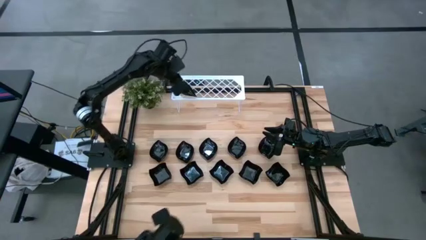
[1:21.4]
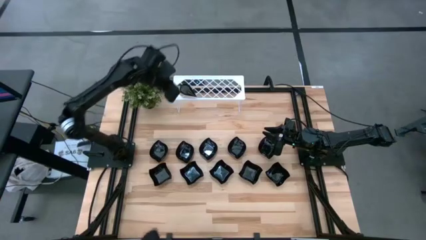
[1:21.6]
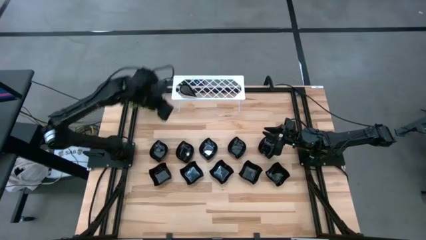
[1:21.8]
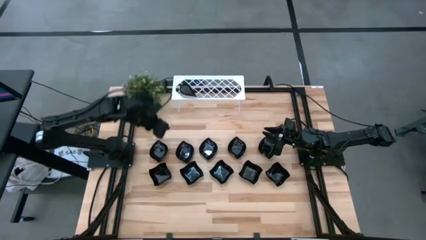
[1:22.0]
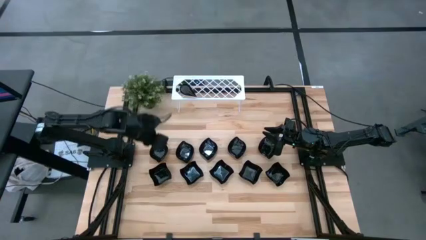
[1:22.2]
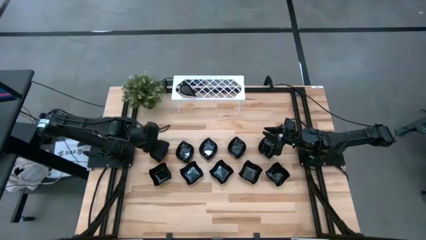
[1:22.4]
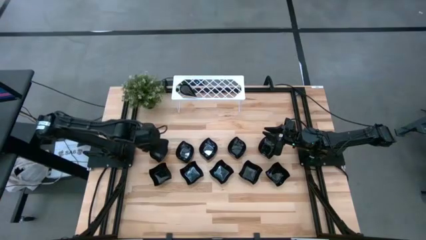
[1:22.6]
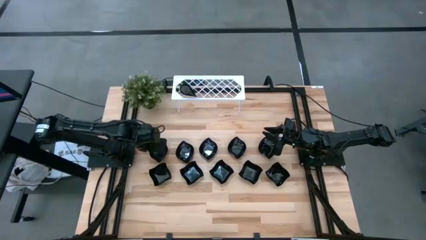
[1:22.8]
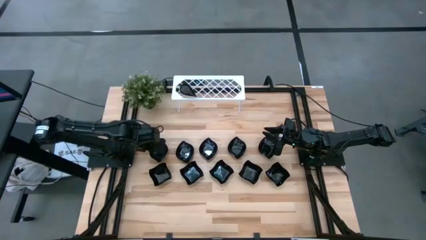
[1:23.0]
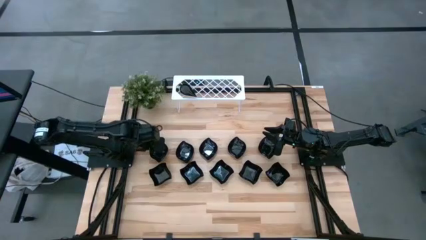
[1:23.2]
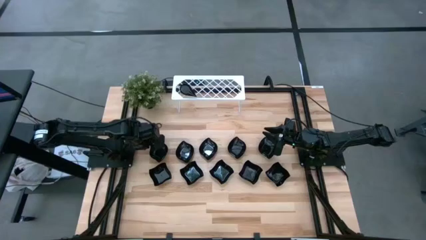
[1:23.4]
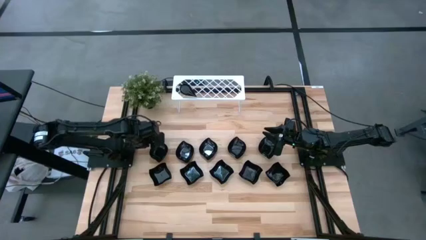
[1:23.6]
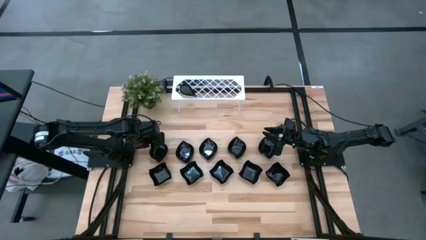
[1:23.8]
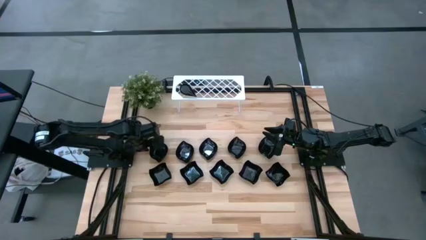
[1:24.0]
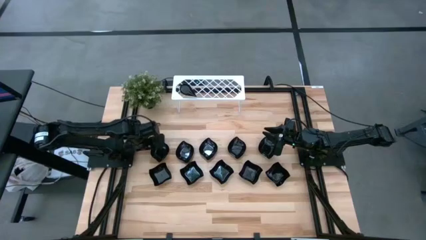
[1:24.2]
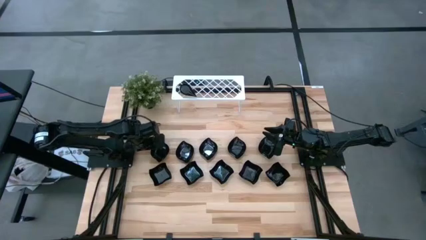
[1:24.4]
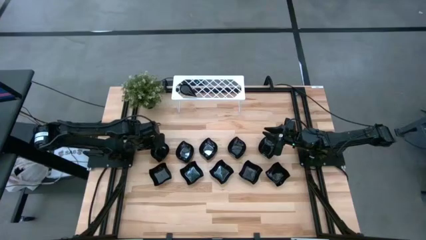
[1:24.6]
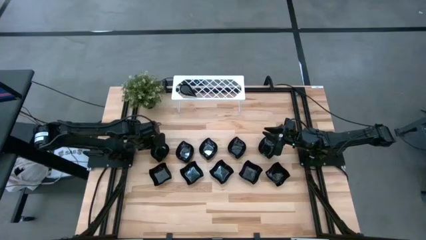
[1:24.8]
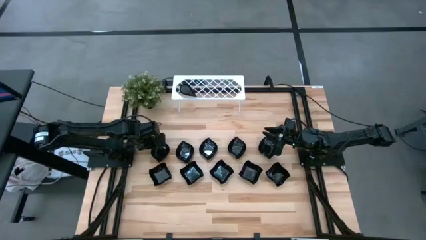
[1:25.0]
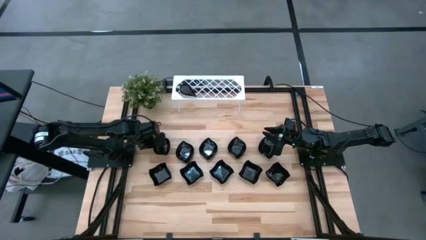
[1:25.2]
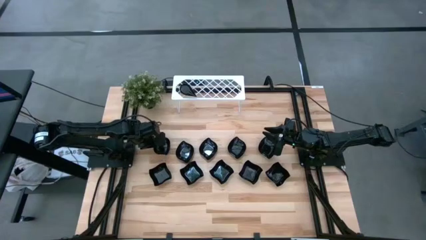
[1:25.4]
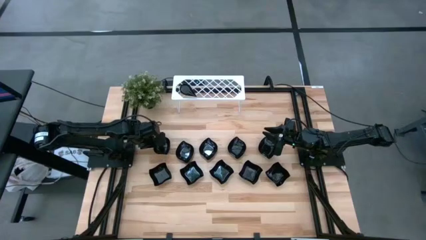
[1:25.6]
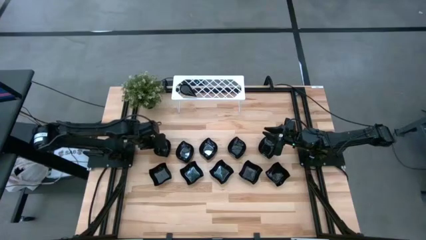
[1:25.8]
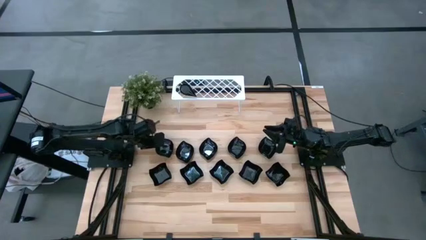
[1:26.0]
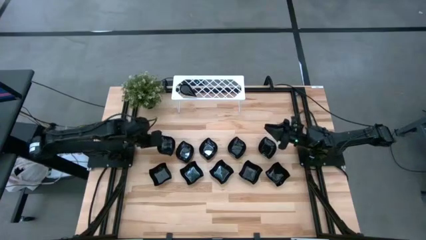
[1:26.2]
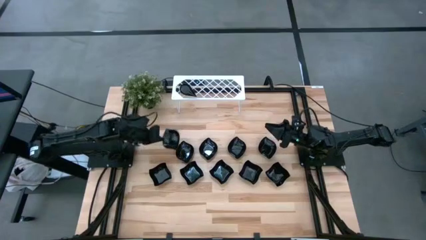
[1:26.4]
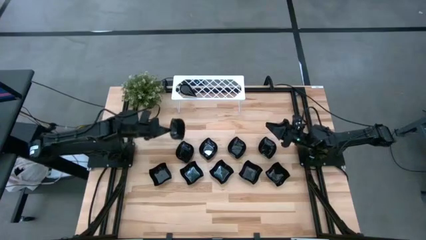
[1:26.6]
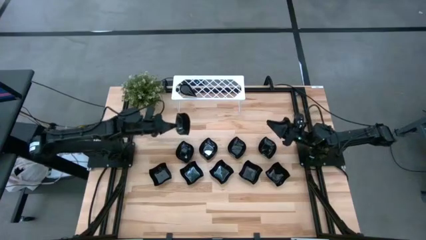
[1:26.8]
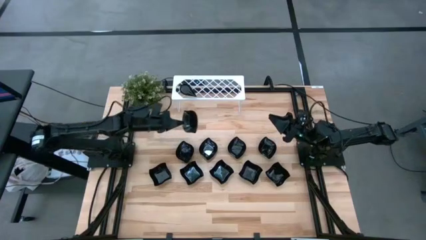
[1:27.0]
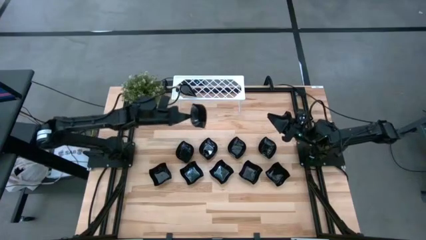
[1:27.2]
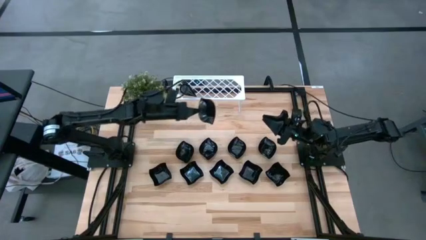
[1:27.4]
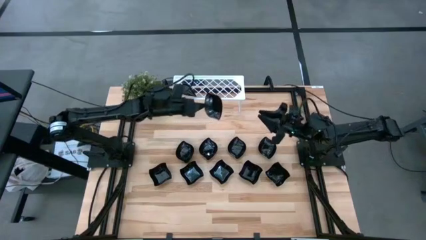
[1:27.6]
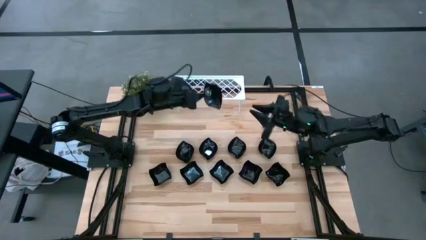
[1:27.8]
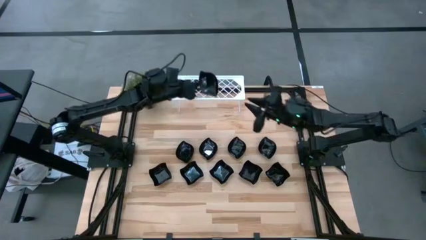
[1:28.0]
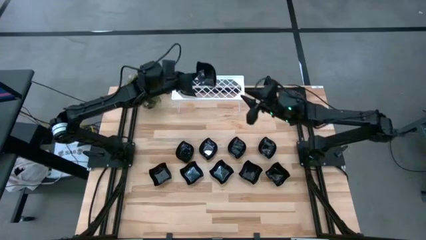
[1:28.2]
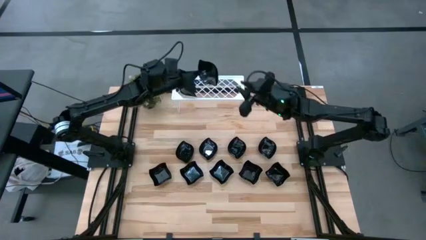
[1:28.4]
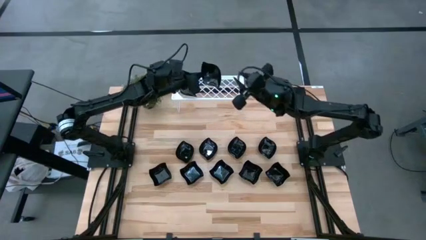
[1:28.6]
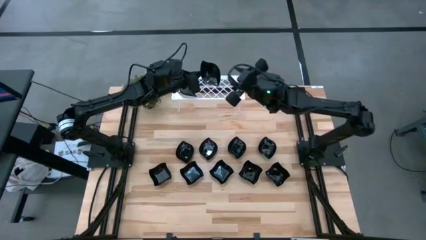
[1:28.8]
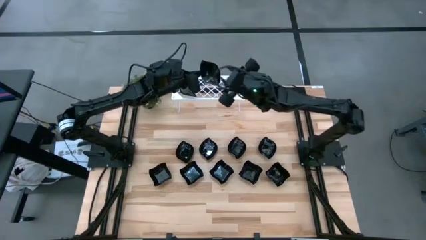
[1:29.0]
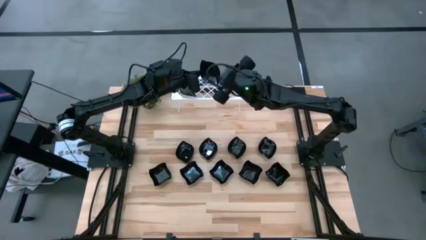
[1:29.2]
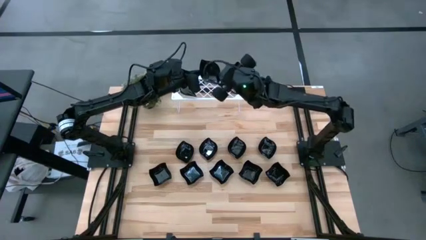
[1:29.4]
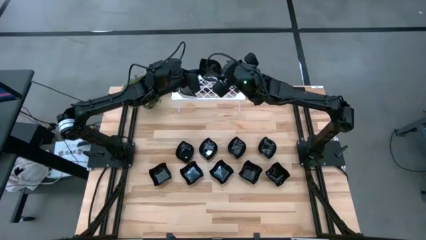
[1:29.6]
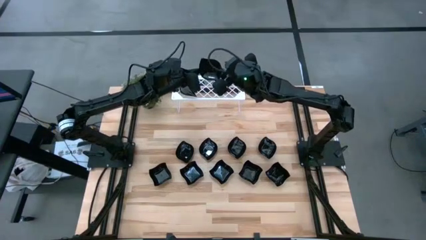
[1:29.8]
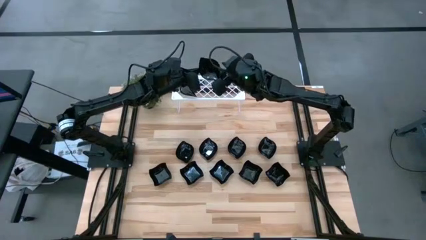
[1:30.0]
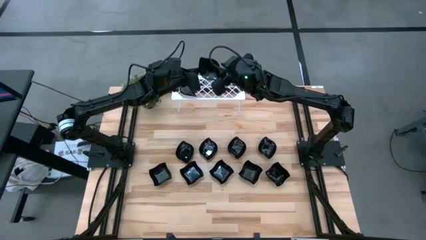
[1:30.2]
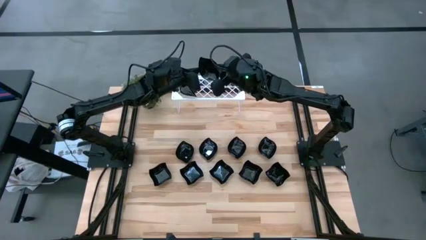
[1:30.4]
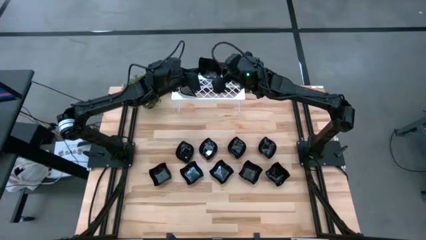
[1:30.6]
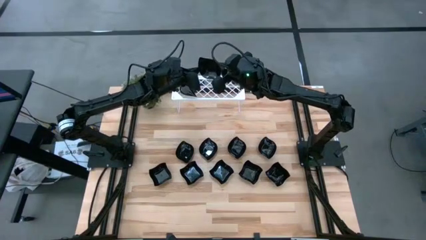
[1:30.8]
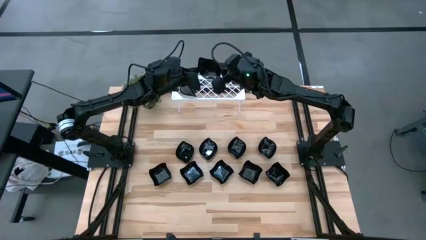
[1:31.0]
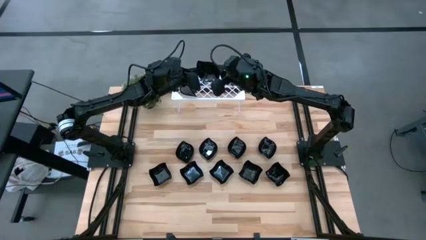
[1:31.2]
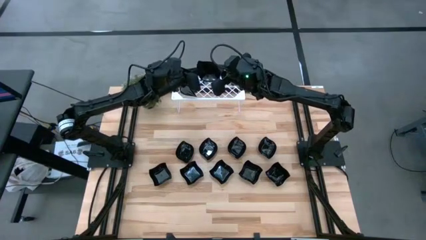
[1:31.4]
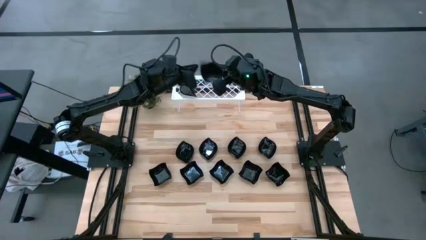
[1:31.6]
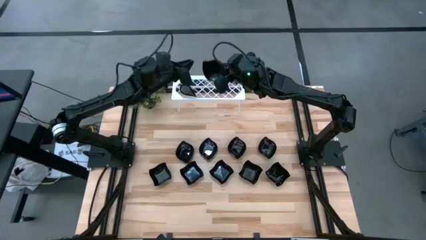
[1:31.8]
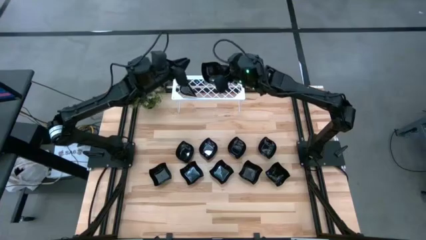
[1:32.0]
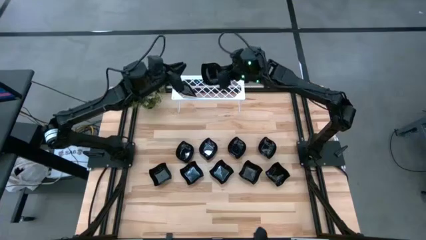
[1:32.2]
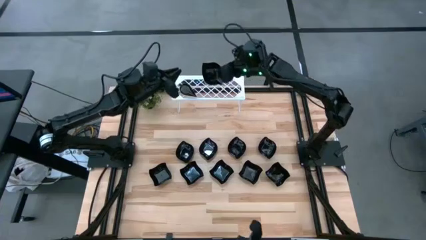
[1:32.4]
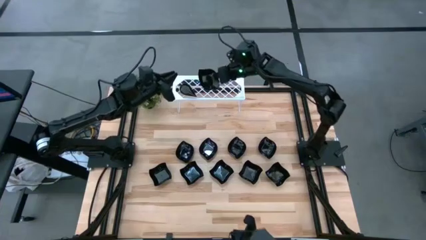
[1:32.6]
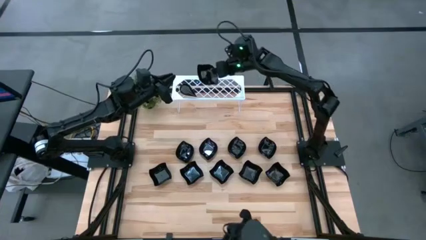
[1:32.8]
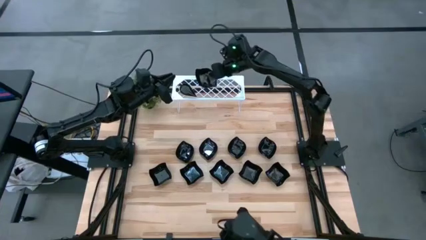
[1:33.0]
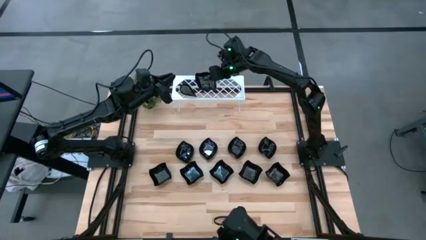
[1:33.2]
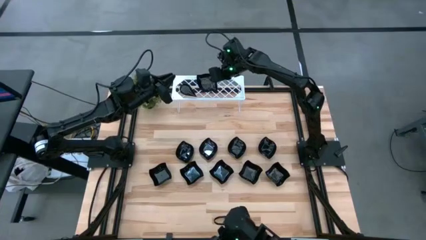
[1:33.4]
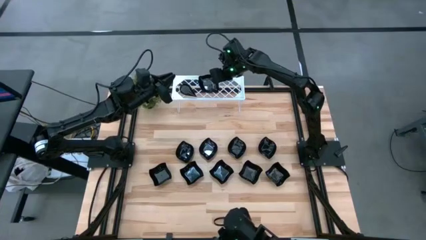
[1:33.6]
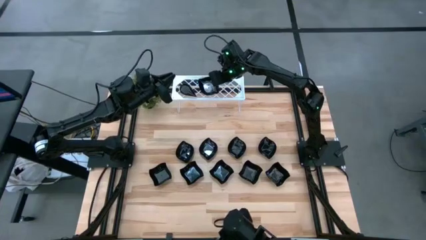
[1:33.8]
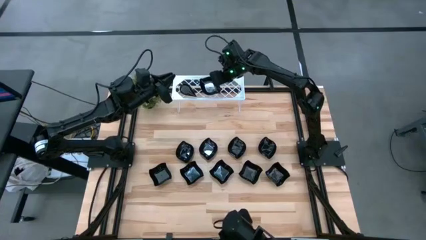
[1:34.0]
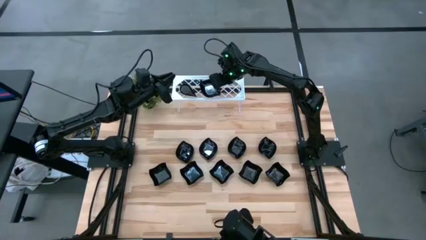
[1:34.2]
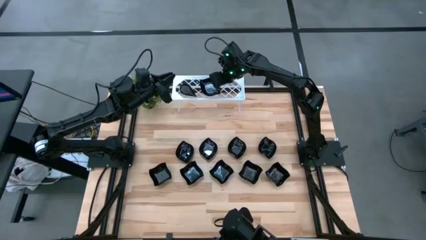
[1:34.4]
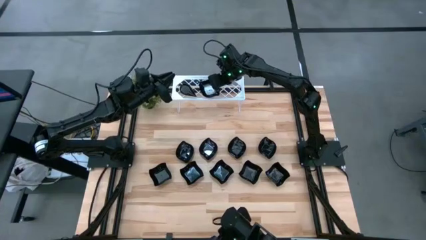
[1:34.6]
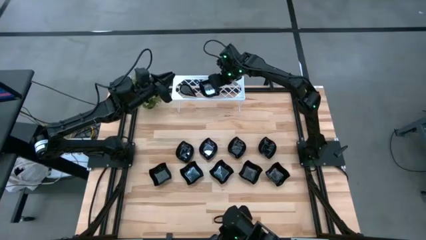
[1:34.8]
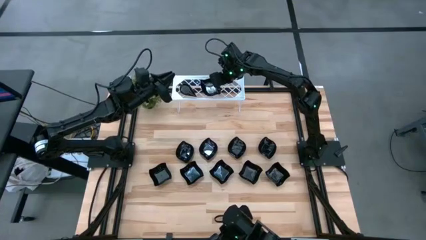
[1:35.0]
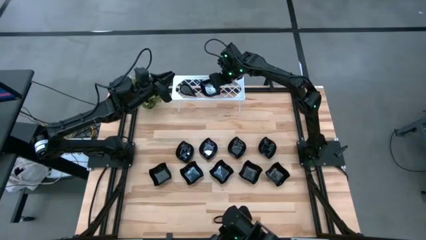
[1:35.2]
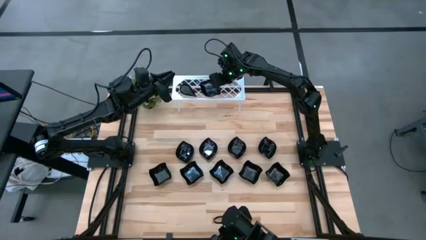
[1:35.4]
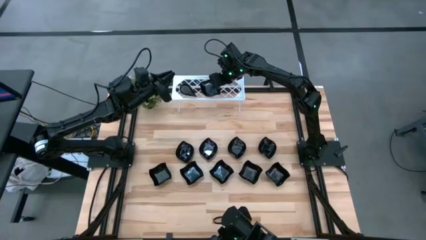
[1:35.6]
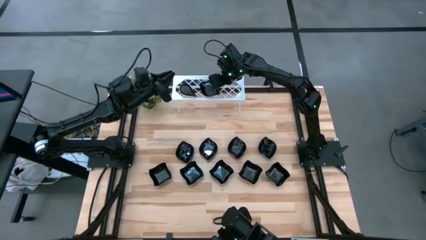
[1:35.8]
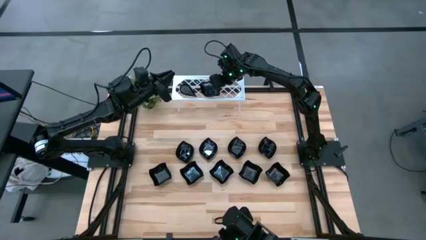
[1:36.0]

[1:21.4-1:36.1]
Task: Pick & Place Mini shaped plates
Put the leaf shaped plate on the shelf
